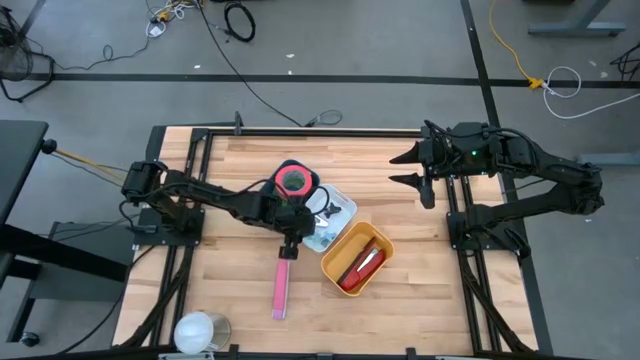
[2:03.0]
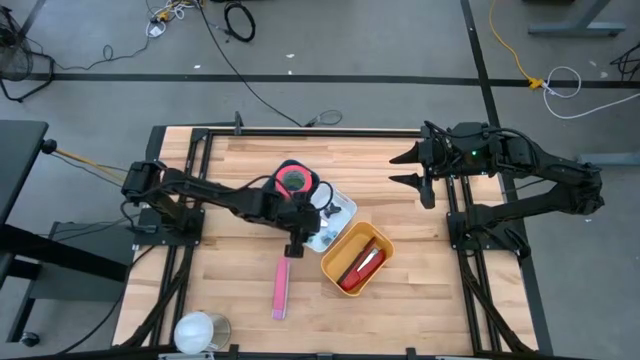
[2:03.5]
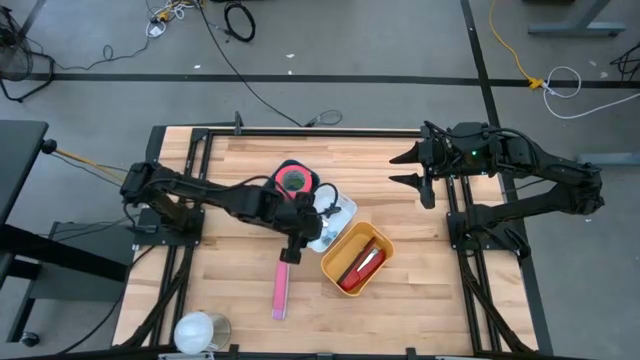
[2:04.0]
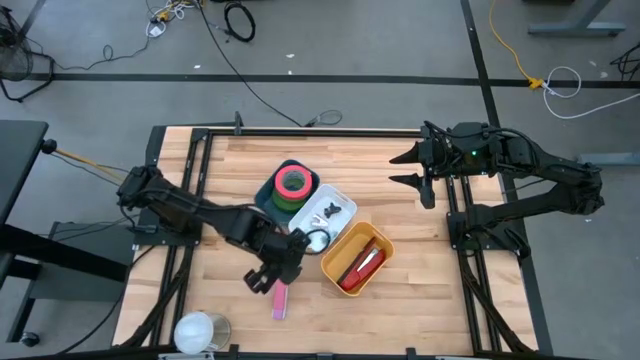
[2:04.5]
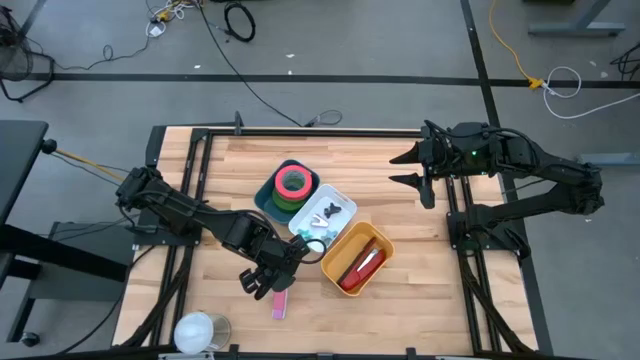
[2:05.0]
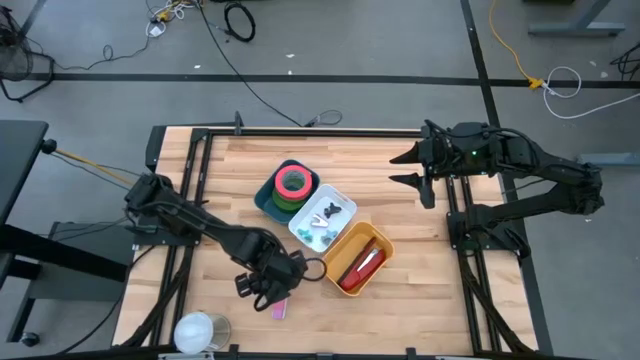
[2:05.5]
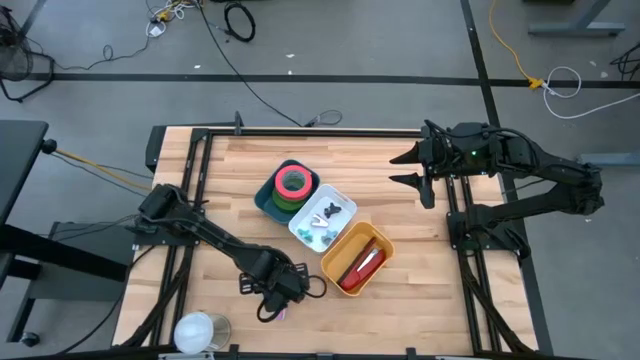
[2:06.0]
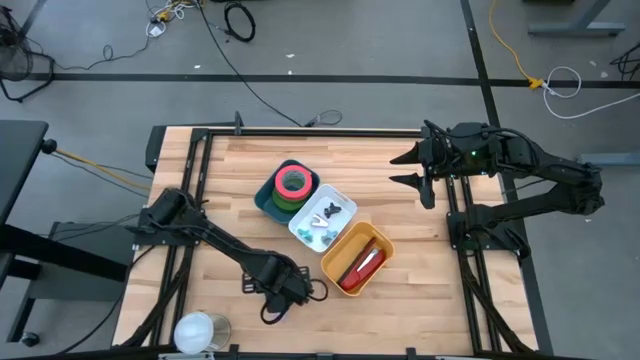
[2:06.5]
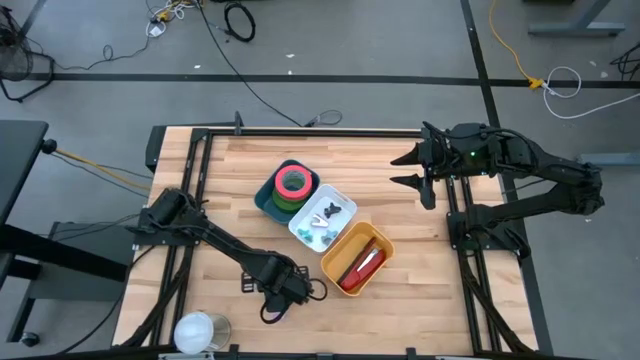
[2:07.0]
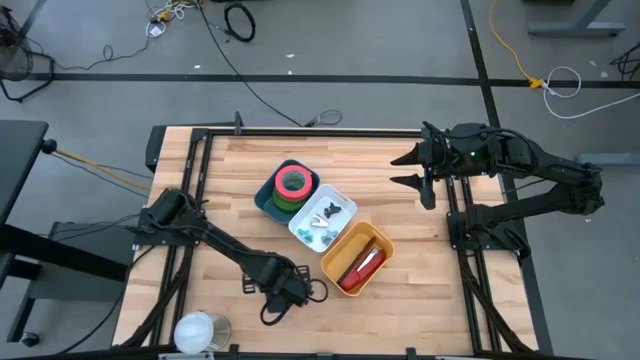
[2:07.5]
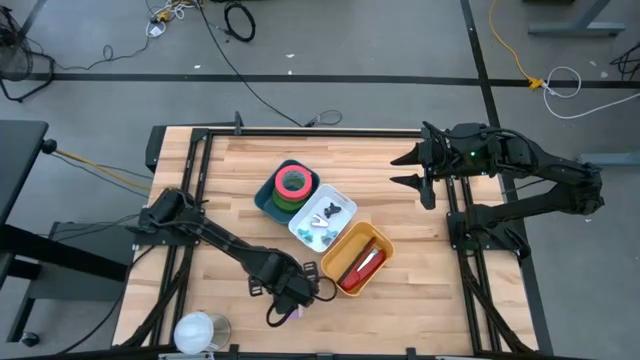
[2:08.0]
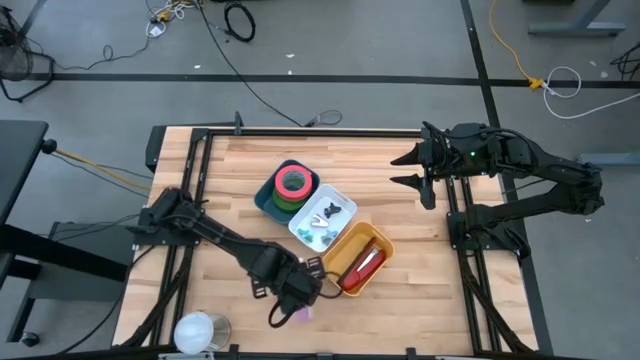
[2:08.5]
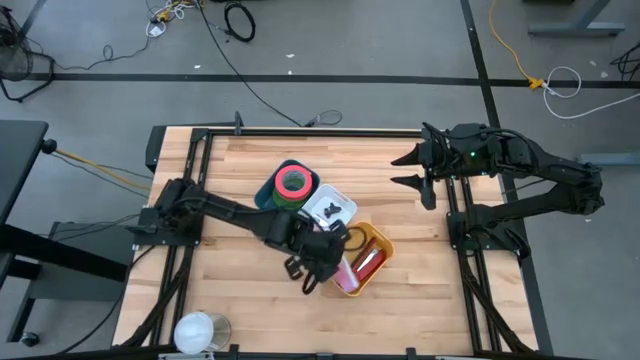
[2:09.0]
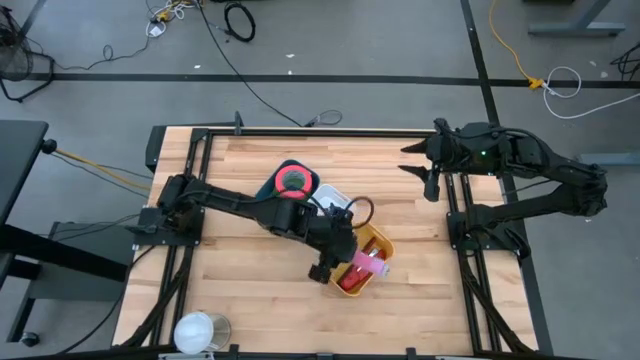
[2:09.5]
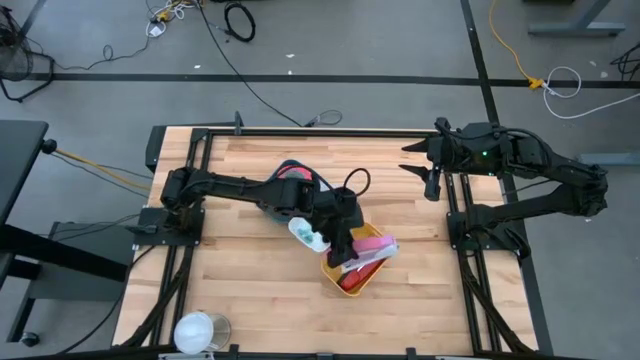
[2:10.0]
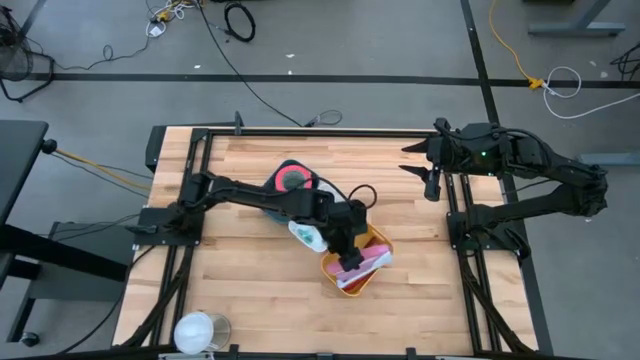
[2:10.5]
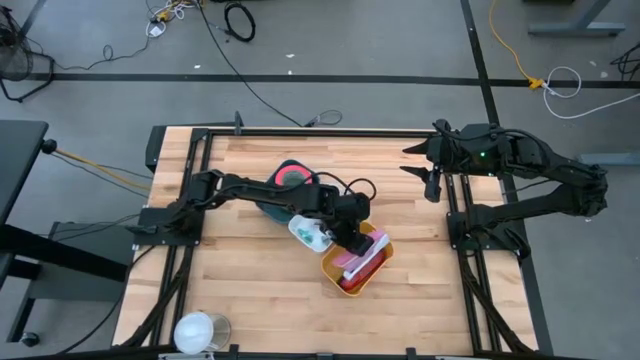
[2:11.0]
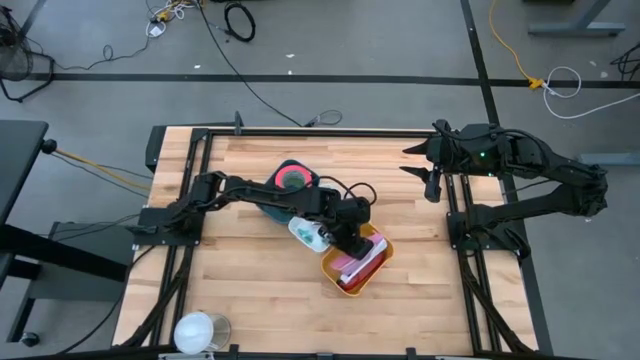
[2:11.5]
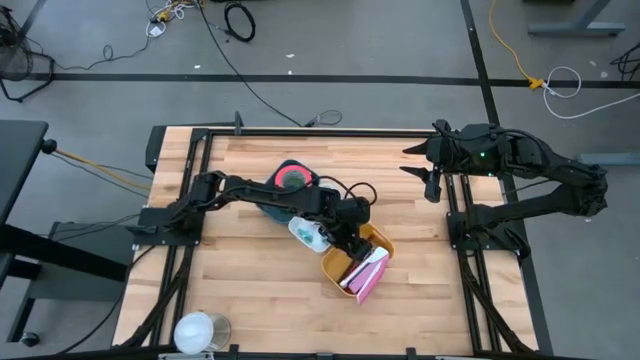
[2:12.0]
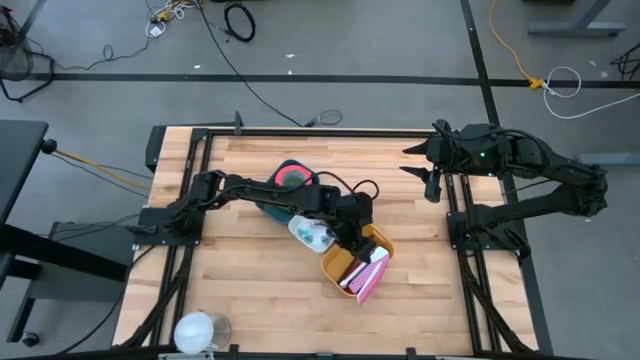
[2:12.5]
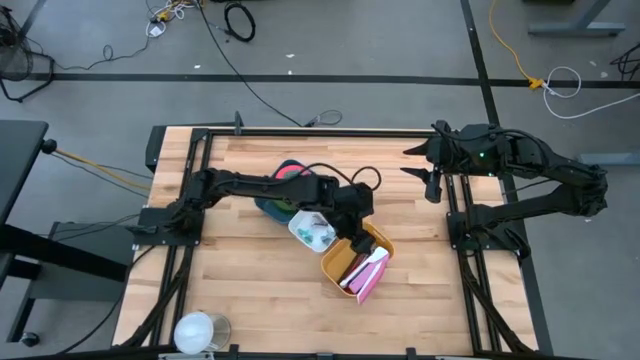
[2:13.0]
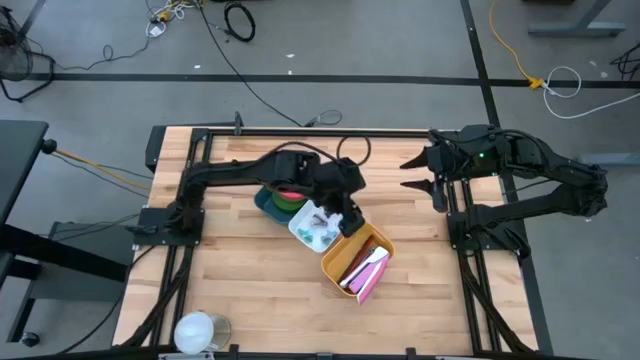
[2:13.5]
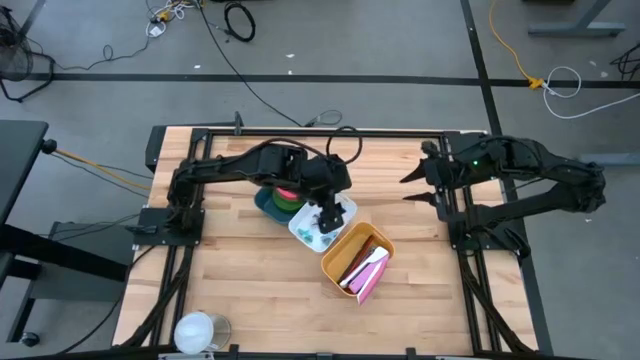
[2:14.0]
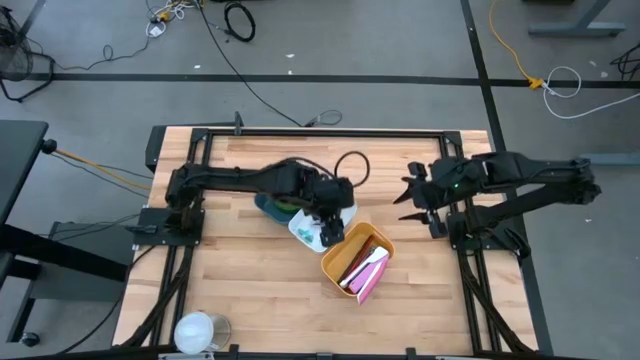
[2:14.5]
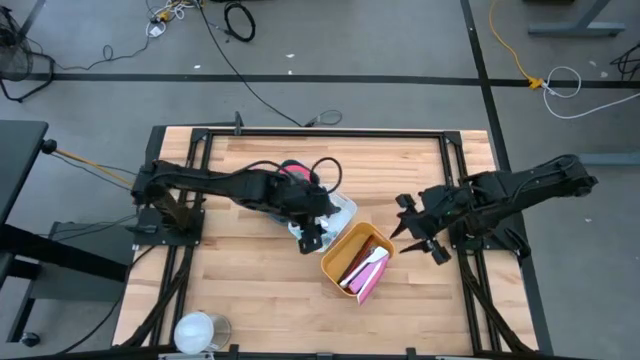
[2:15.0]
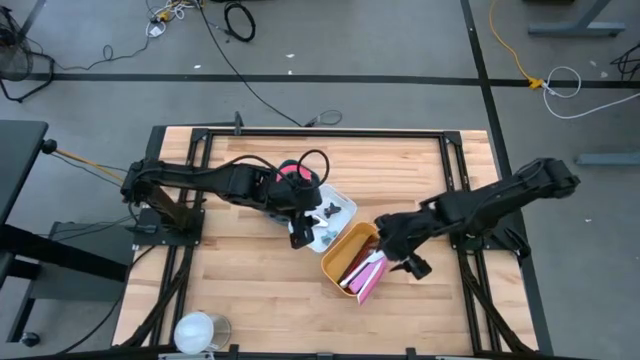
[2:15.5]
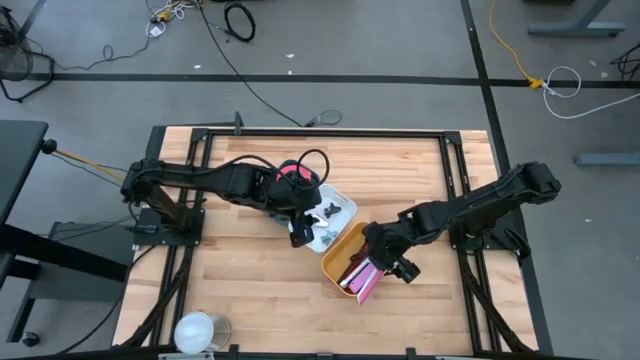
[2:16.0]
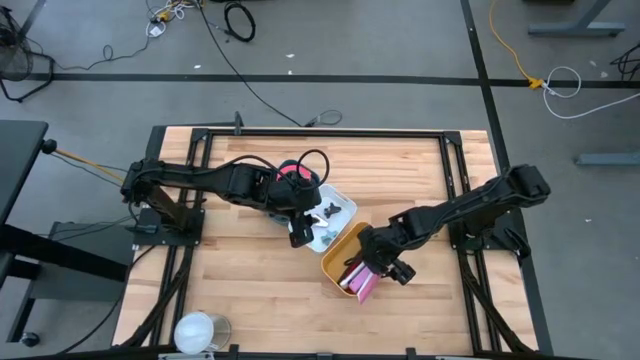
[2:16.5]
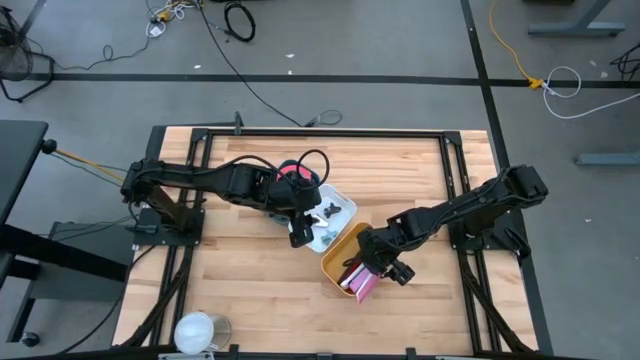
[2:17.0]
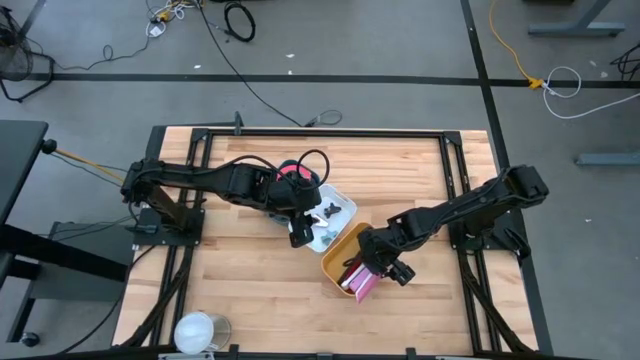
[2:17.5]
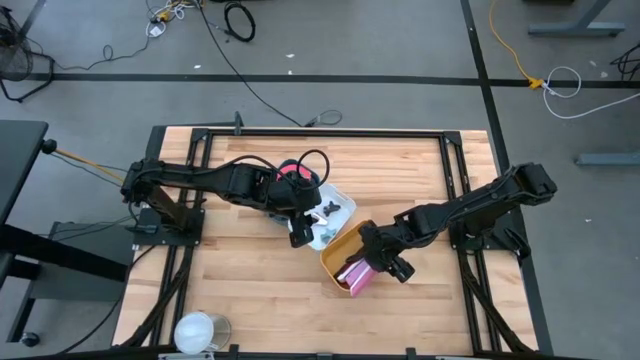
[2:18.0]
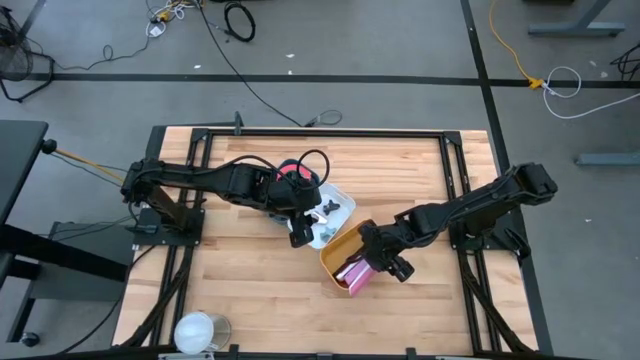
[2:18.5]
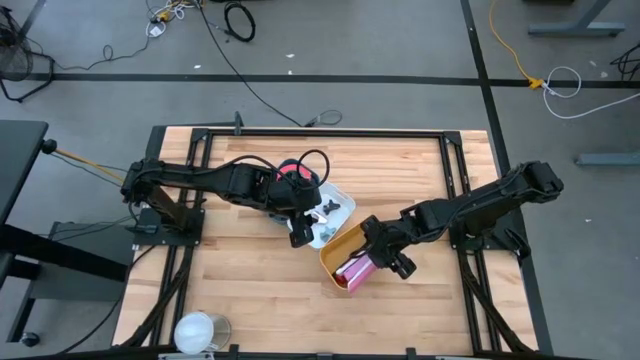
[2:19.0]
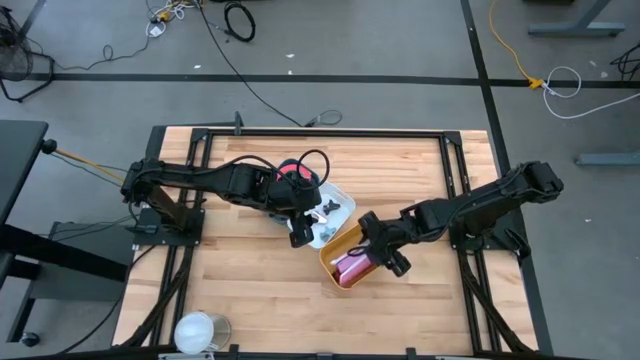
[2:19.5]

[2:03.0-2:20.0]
Task: Pick and place Stapler, Stapler remover, tape
Put the pink stapler into the yellow bin

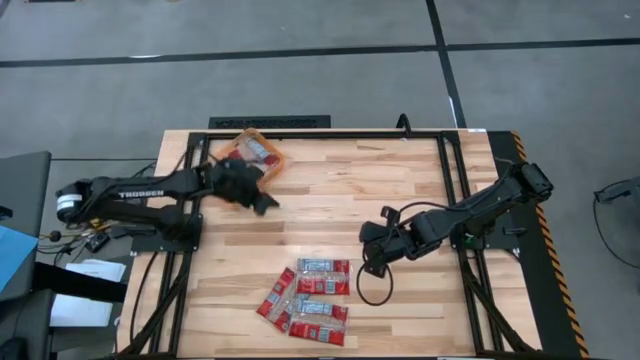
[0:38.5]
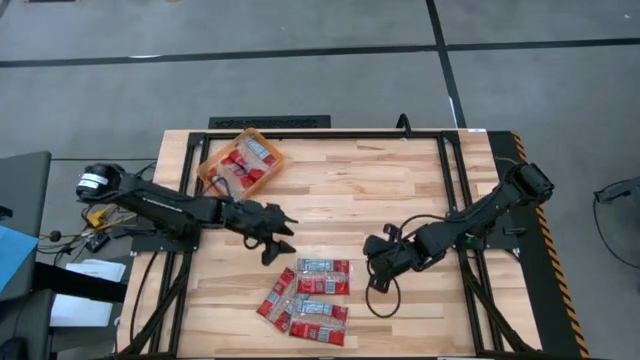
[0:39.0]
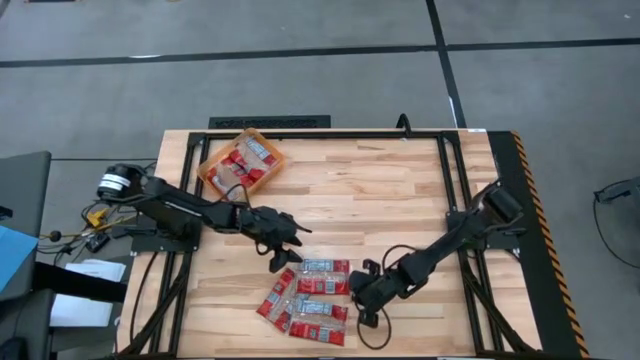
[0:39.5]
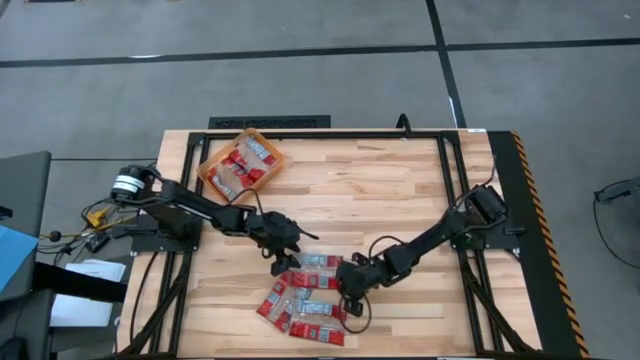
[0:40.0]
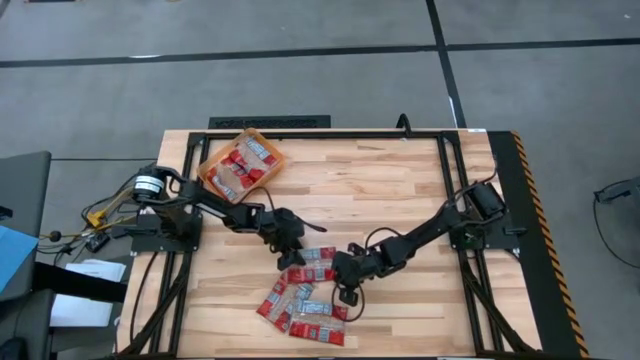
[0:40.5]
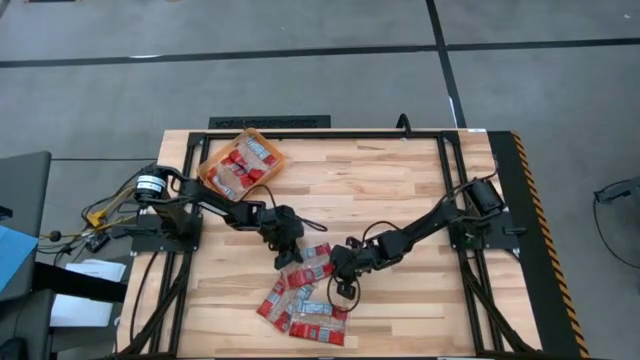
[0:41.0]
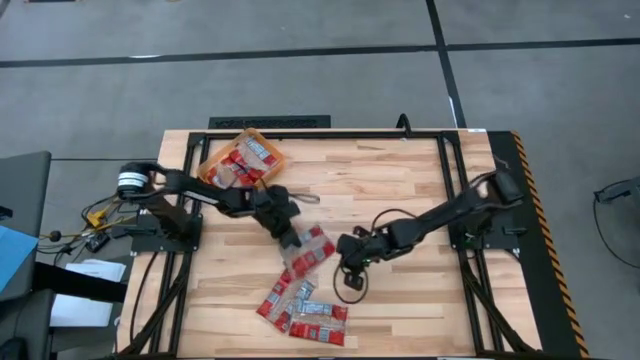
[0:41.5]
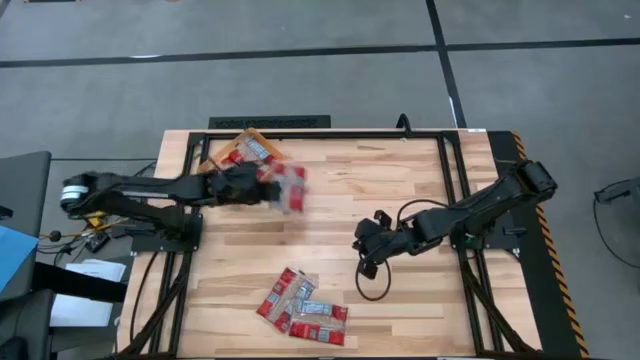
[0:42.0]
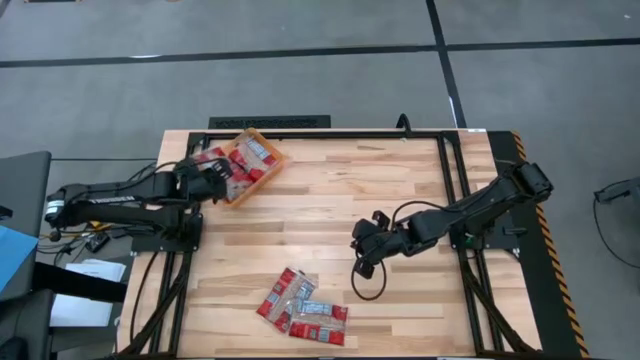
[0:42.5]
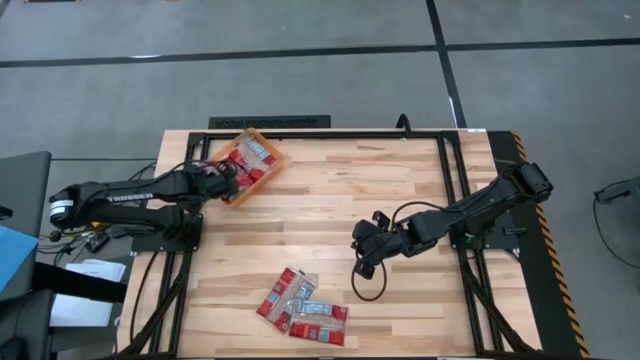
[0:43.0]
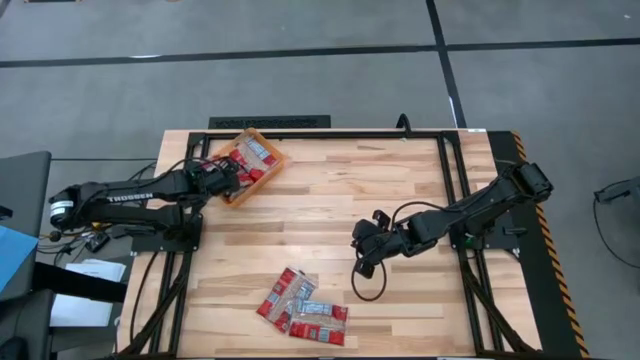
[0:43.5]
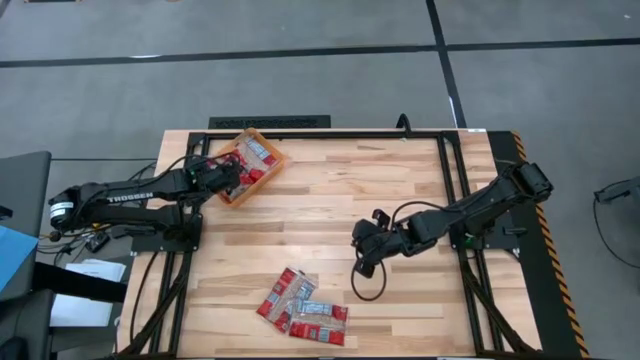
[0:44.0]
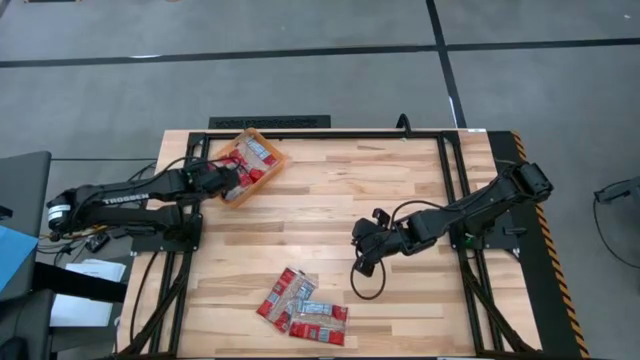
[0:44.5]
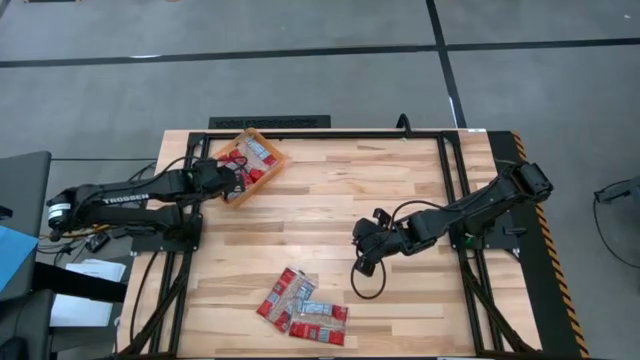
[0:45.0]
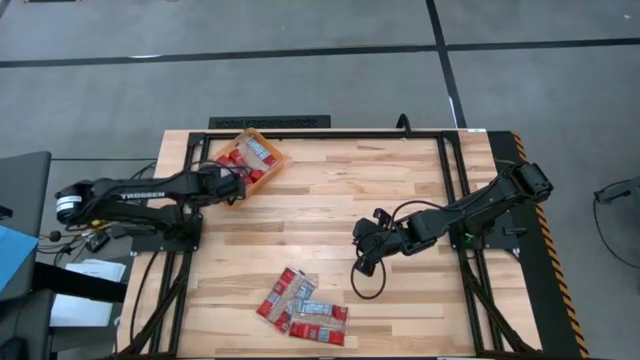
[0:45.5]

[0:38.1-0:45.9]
Task: Sort popcorn bags into baskets
Put the top red popcorn pack into the orange bin
